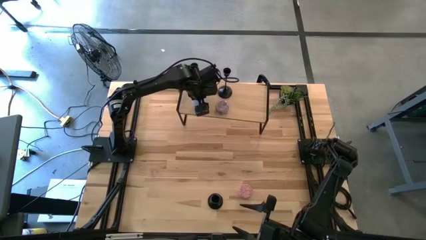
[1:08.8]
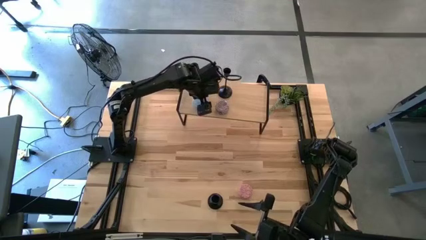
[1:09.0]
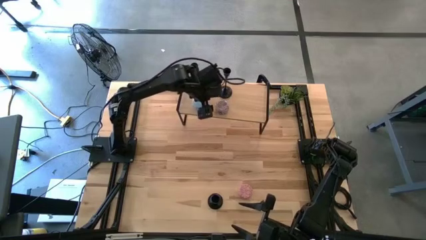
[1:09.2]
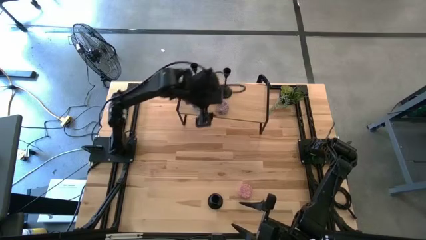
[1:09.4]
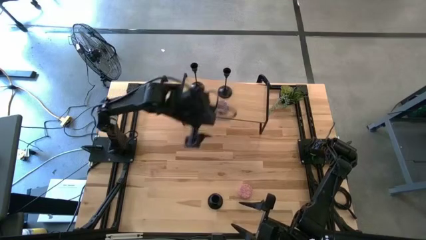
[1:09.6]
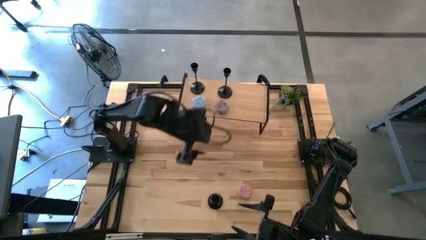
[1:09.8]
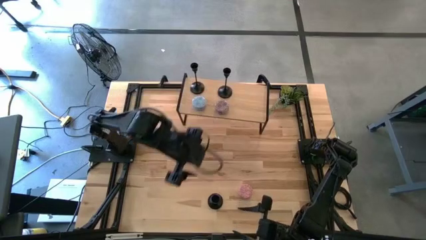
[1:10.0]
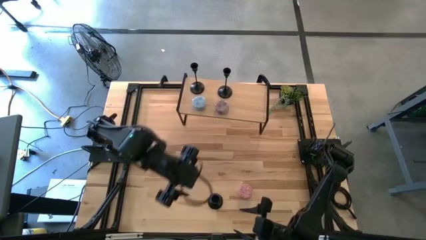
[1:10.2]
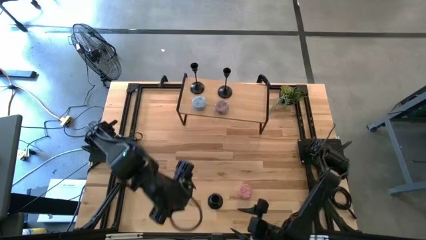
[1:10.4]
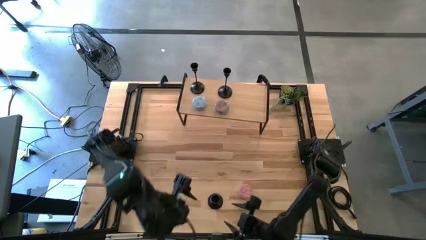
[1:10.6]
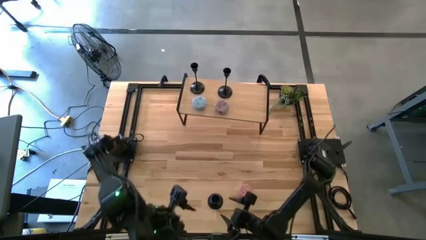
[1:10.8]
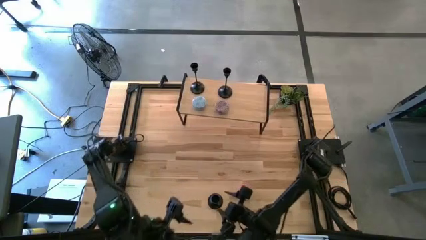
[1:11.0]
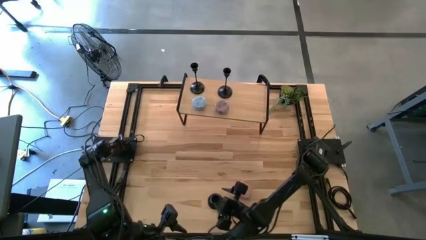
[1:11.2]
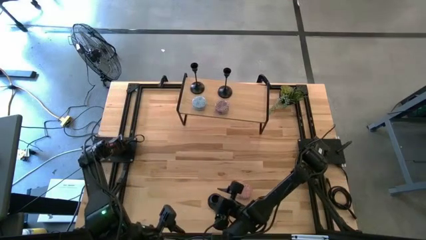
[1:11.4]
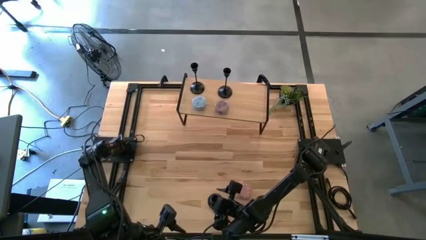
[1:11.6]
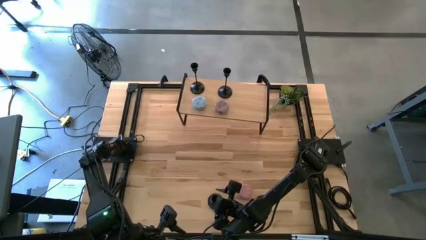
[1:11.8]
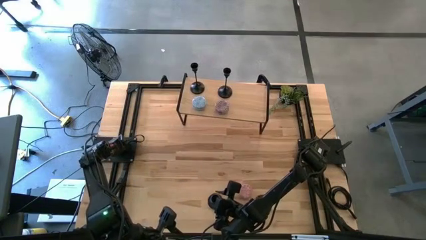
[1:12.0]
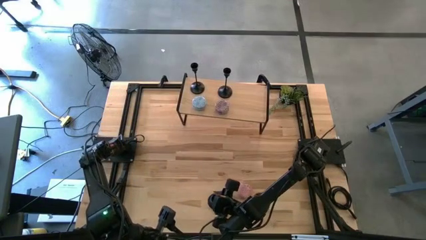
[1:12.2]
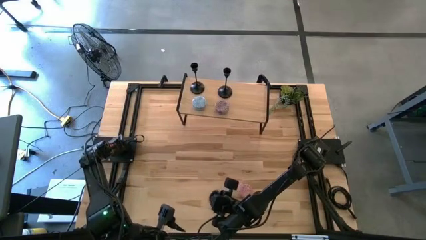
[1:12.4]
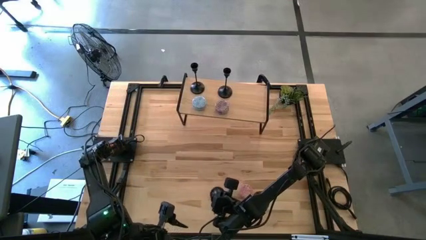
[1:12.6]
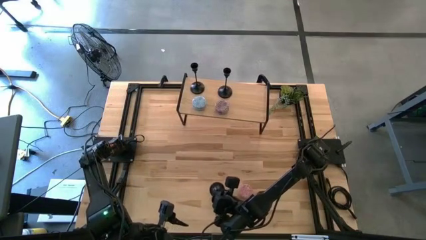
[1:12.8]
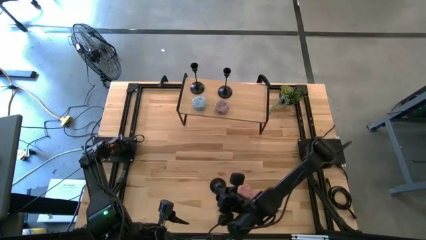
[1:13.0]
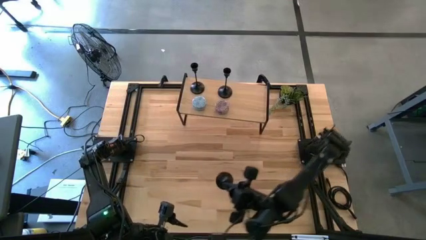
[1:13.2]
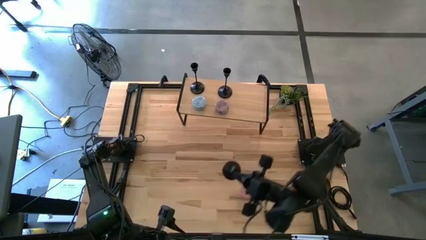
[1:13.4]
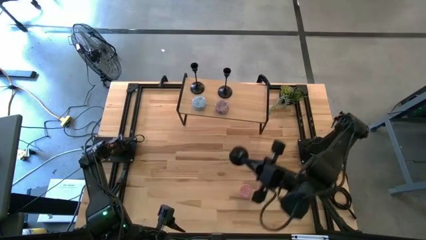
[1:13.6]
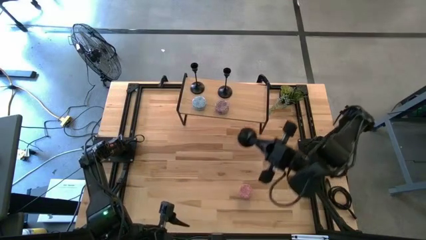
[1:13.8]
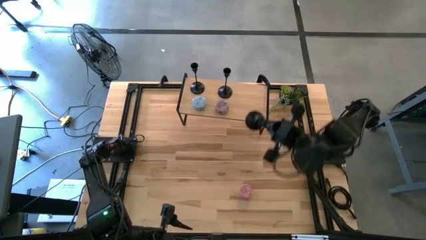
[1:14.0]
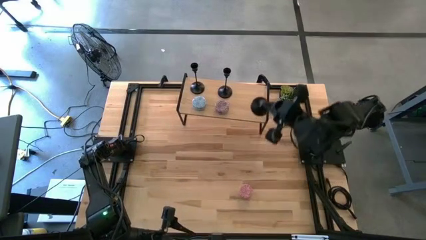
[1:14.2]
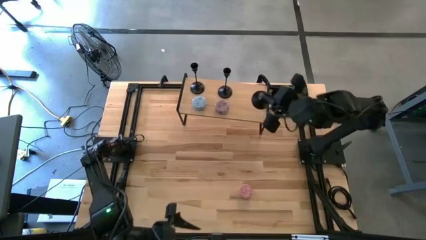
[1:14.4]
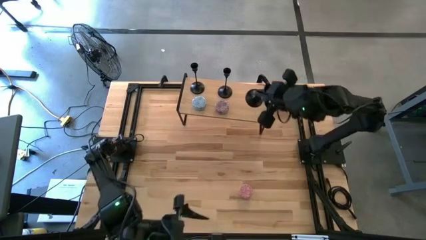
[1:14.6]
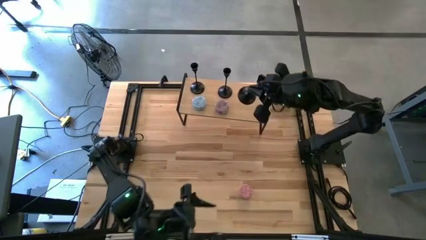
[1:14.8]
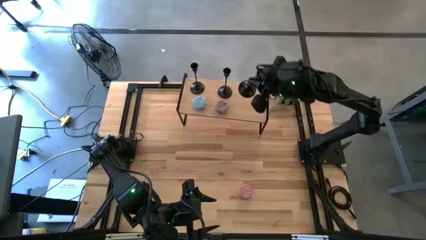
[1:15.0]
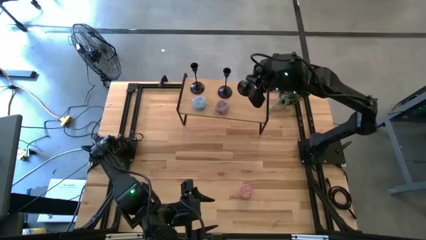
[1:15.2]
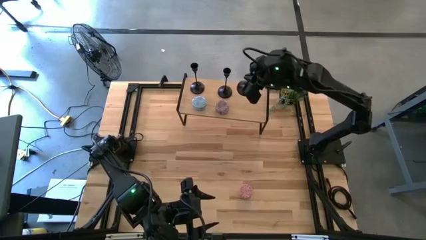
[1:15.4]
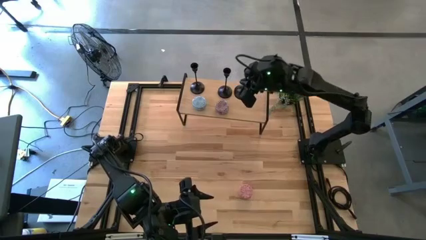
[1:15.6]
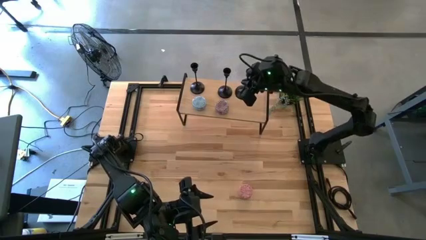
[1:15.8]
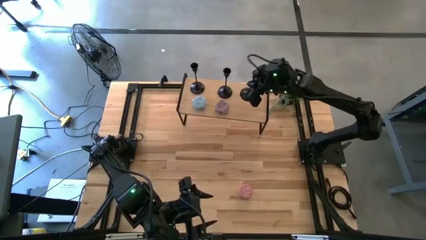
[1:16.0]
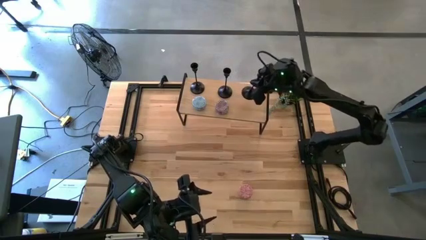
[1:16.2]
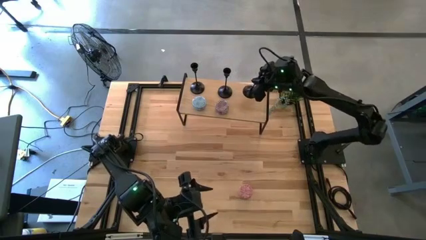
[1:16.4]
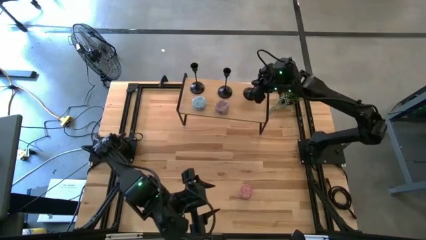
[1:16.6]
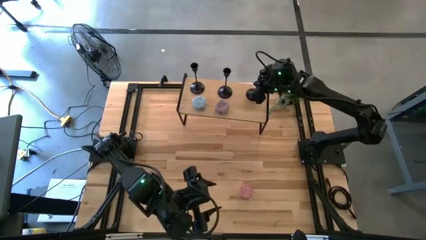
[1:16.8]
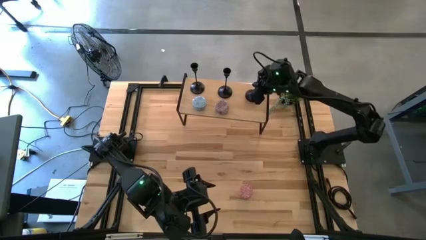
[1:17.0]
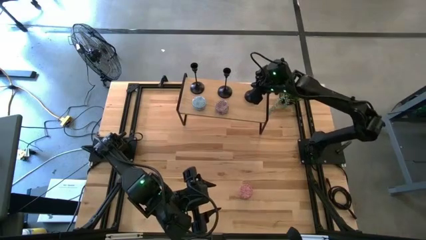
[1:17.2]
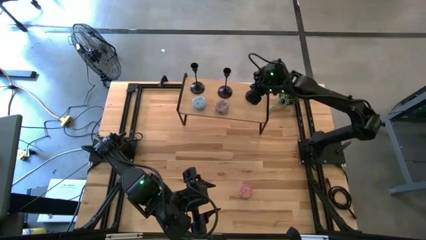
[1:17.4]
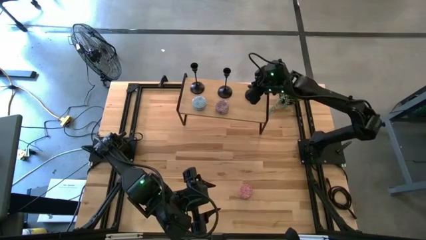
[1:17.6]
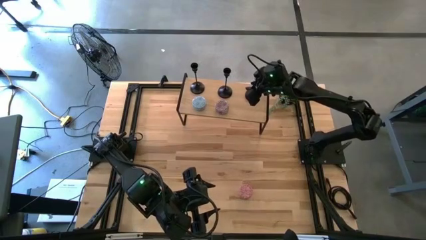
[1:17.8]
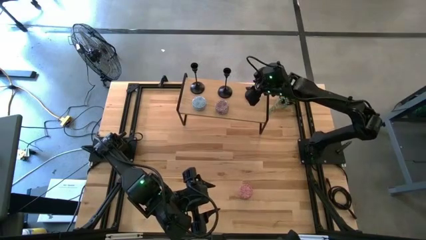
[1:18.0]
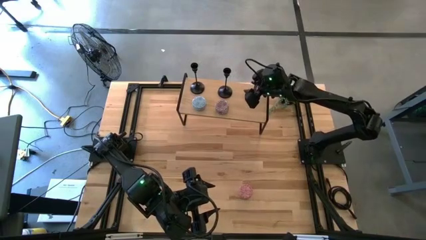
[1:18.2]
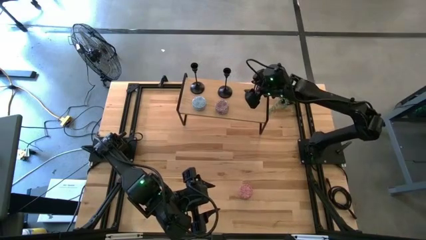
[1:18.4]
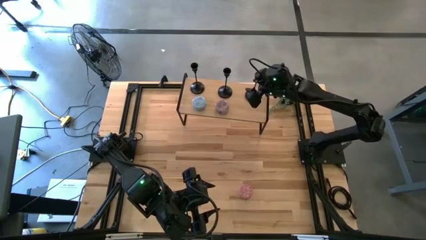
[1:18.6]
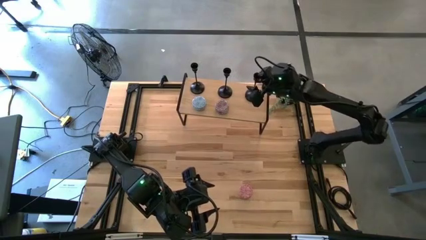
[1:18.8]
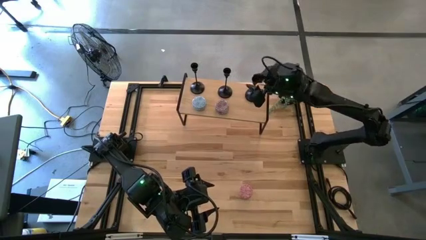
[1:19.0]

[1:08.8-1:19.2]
Task: Pick & Place candle stick holders
Put the black candle holder on the shelf
